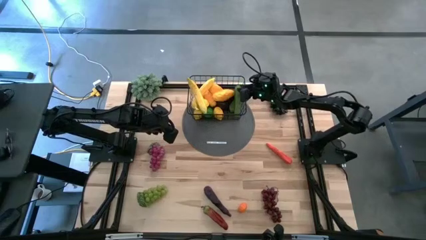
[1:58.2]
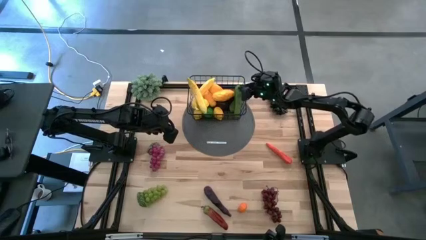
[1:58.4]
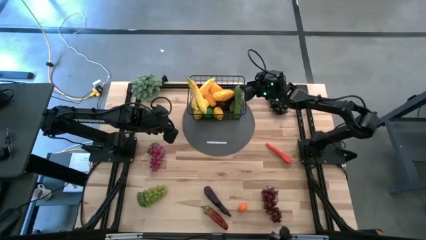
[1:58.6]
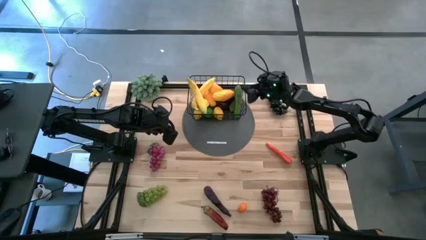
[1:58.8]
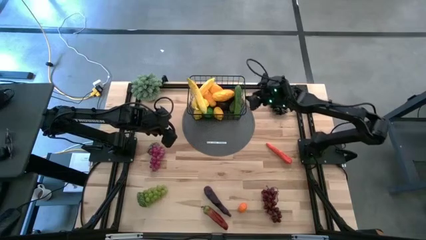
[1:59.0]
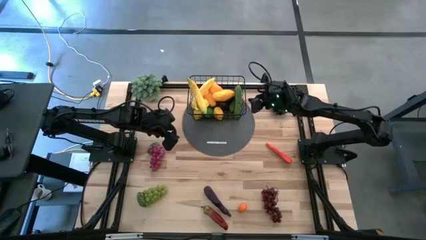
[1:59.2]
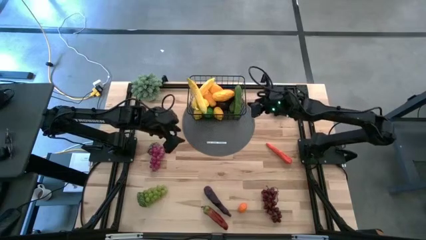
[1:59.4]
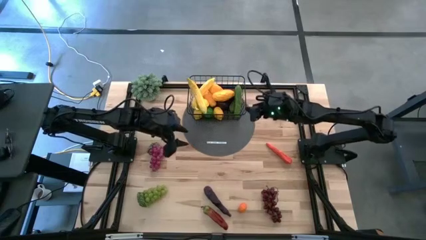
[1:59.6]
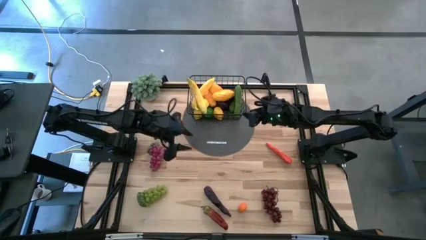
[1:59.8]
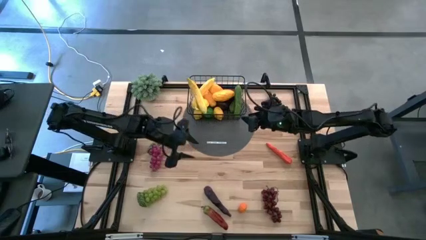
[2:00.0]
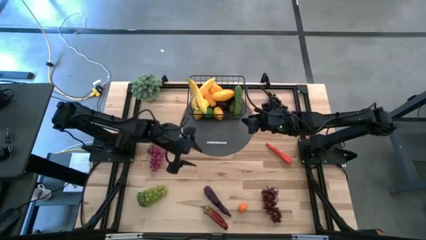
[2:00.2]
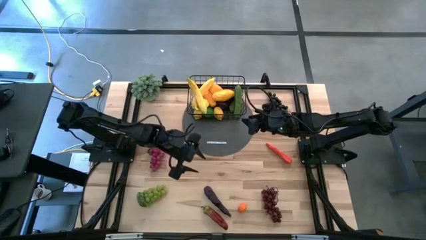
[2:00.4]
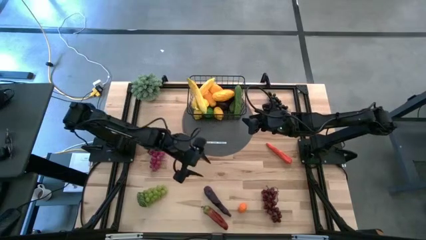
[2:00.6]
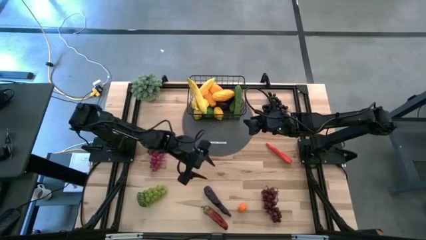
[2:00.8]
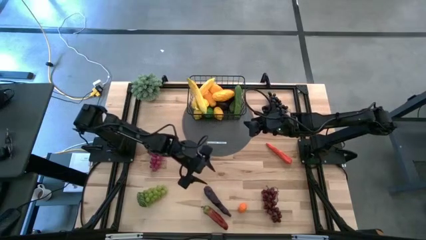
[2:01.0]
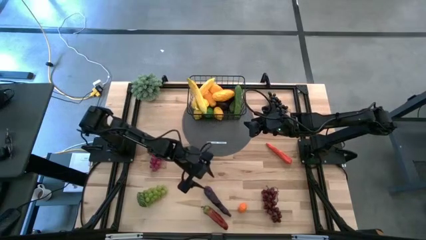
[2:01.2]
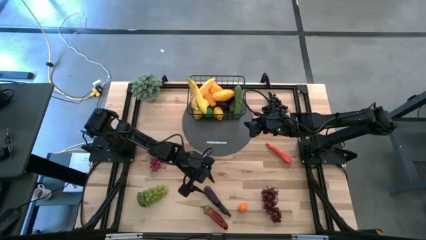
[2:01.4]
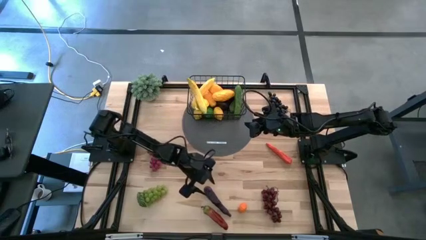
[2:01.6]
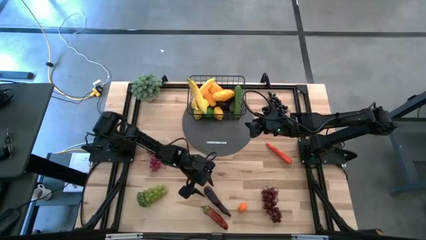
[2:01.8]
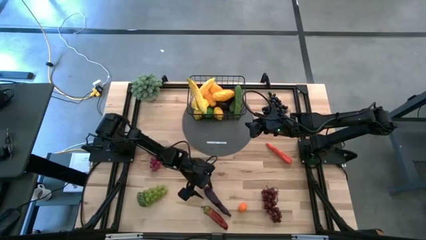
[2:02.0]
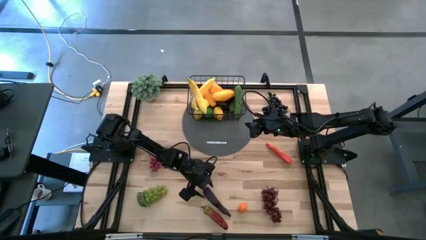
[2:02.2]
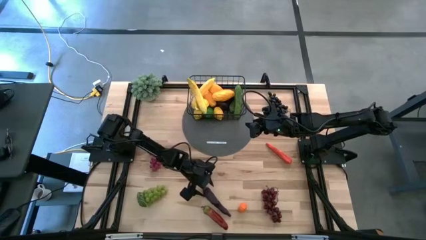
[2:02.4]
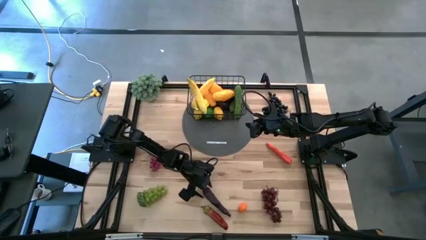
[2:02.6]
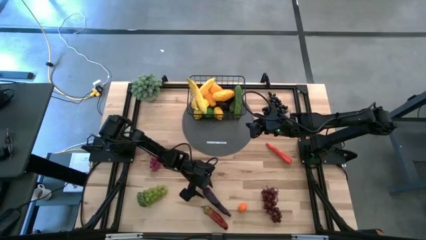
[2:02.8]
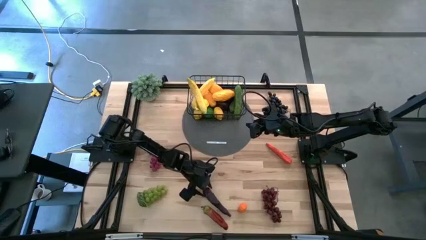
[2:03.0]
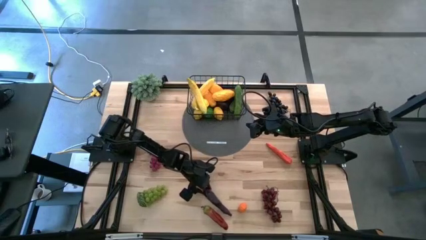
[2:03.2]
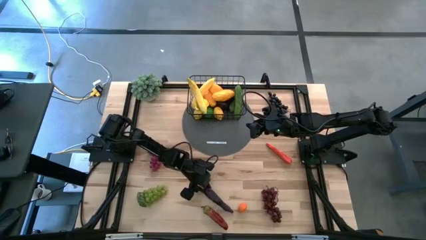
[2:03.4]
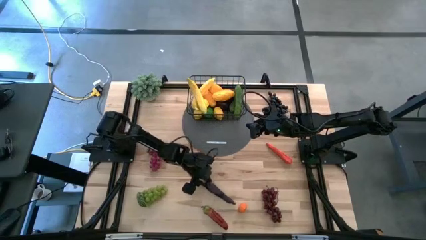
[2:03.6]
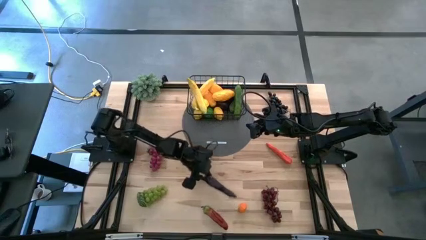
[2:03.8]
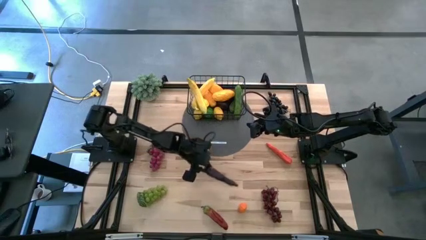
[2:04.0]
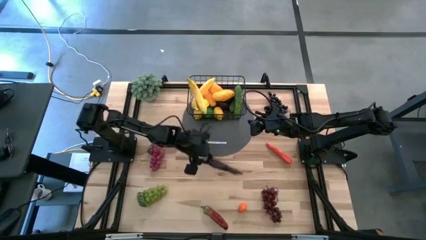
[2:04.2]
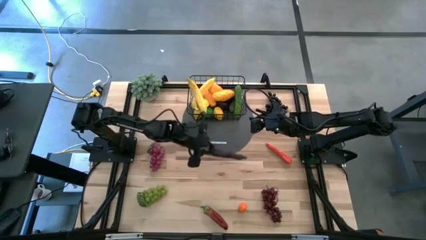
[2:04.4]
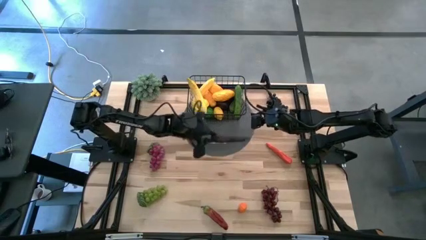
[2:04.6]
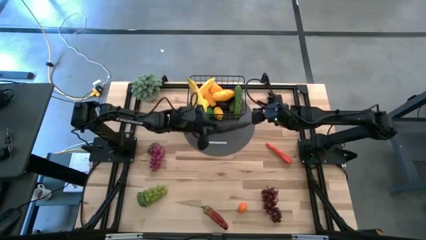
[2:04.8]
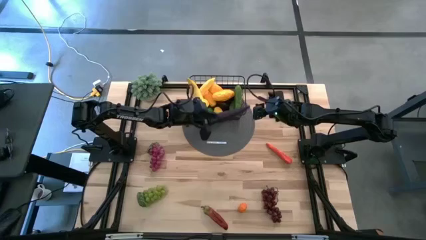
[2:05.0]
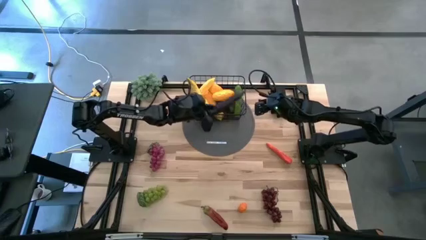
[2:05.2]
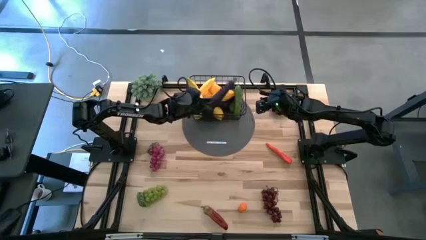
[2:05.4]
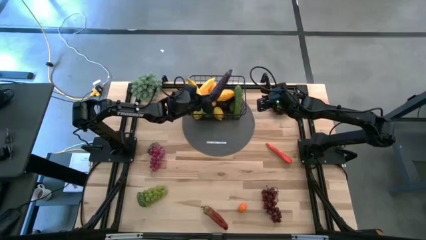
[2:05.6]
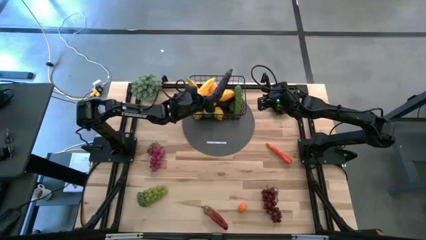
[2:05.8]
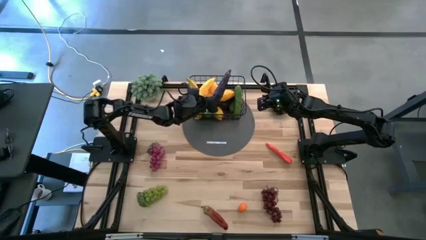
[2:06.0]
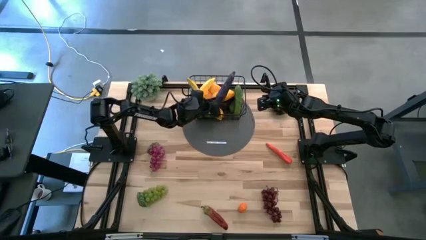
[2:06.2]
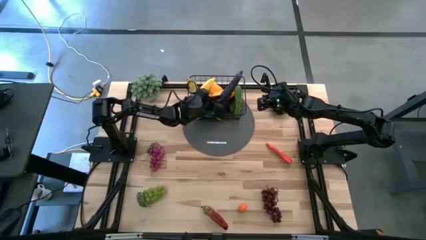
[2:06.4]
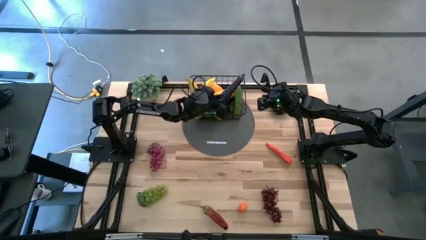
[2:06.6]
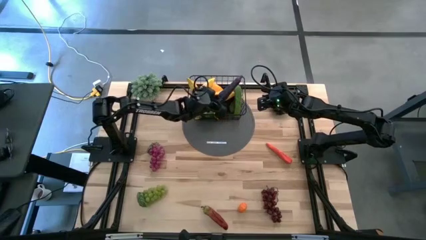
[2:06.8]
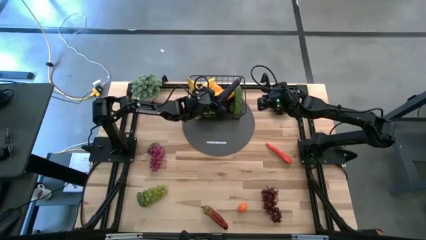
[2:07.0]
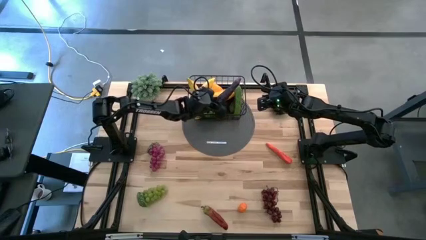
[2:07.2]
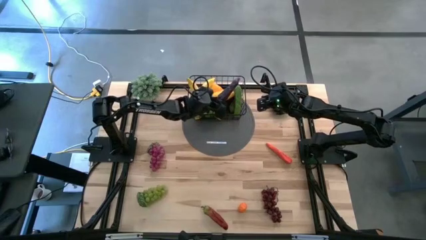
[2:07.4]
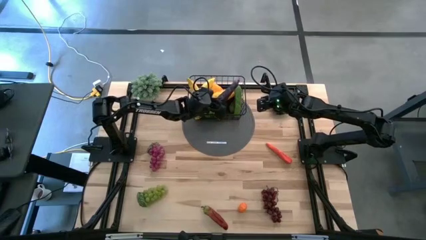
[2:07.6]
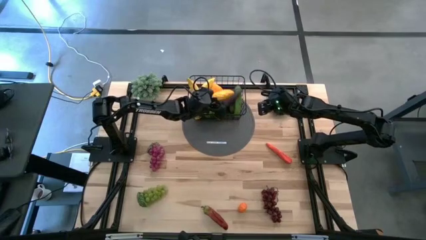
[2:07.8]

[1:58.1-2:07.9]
Task: Build produce basket
Put the purple eggplant into the black wire basket

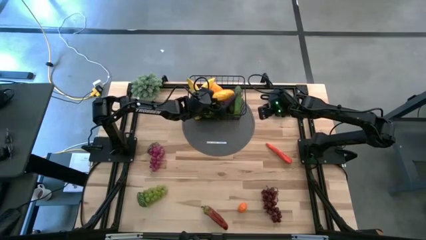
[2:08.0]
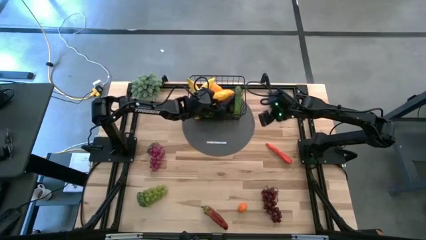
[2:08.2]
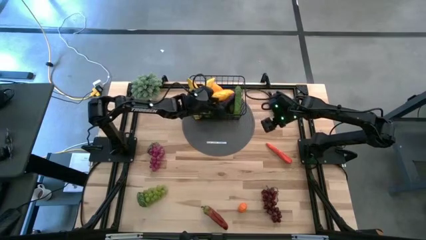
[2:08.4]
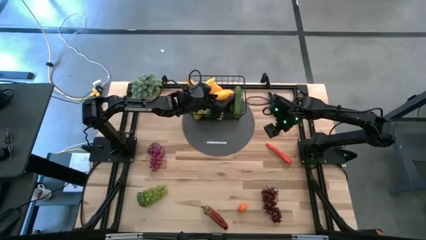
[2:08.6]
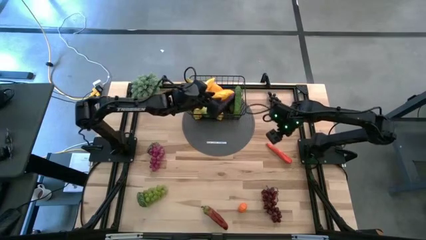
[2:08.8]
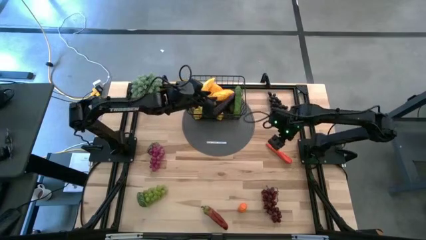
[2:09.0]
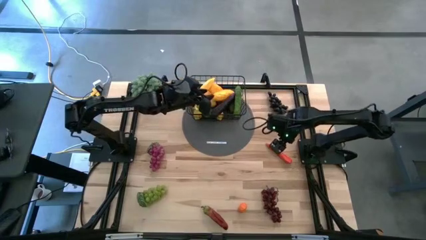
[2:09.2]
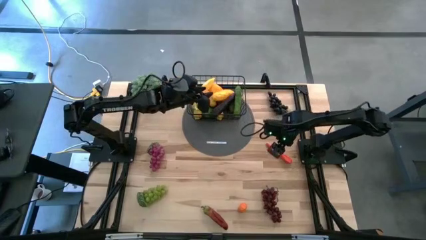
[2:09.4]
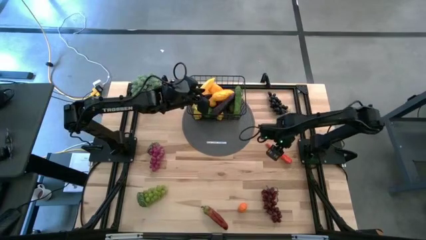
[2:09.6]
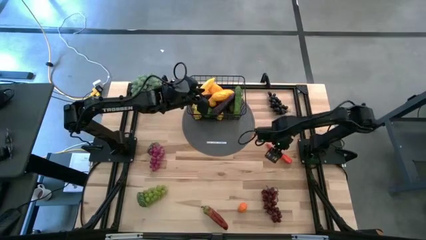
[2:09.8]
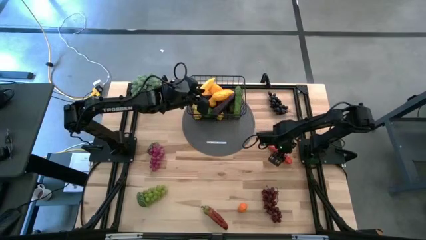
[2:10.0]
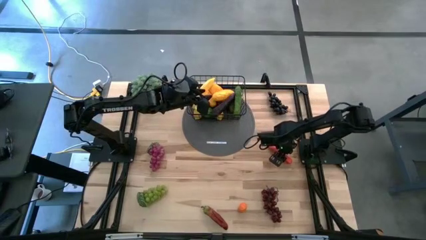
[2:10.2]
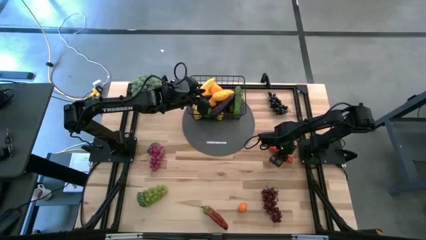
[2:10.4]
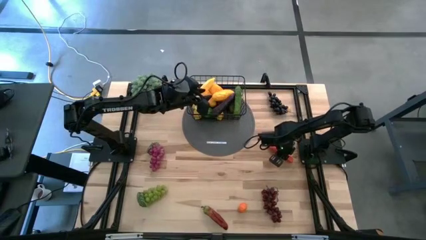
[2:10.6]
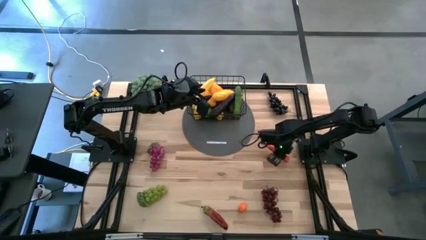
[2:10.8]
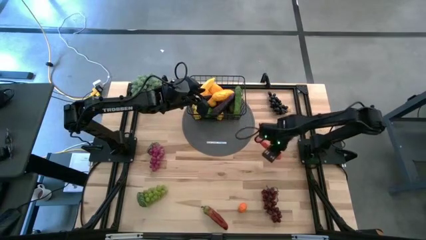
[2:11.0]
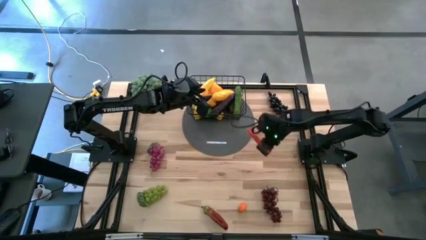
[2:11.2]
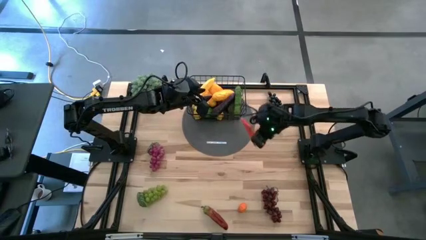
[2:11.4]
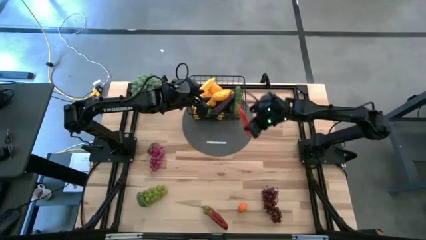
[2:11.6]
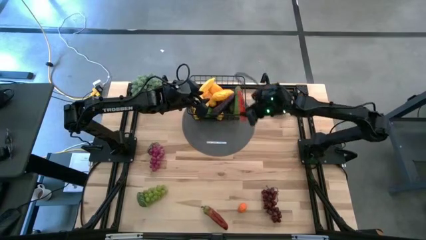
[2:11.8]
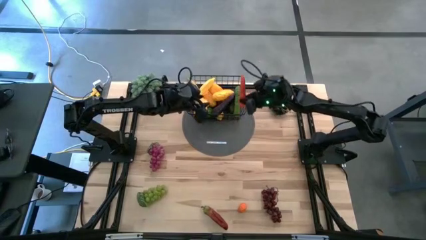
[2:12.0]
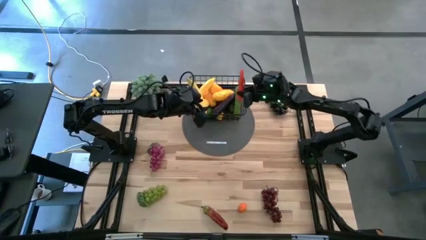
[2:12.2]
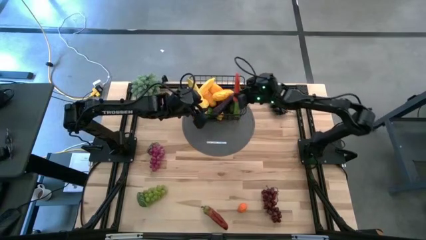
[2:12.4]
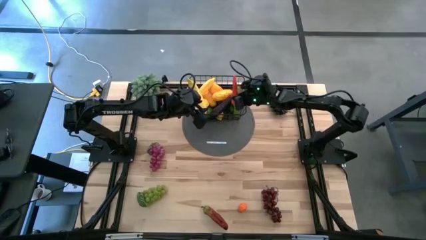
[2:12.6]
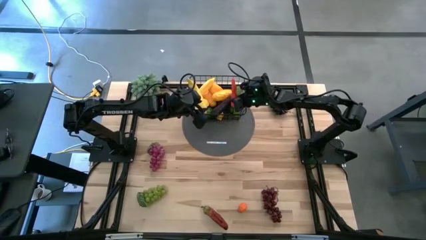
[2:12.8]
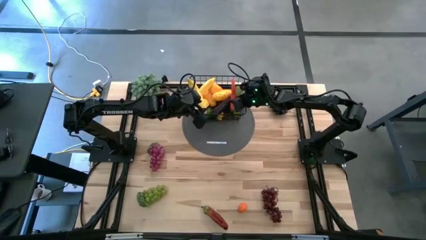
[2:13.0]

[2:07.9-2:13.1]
Put the orange carrot into the black wire basket
